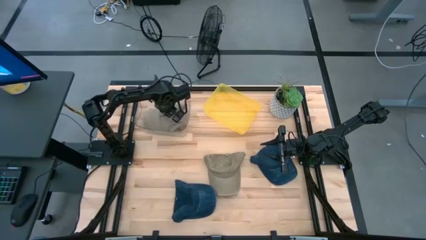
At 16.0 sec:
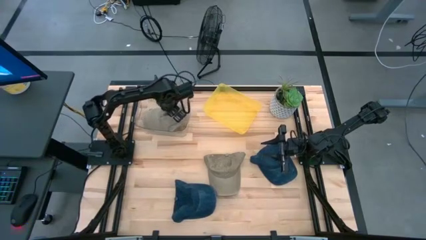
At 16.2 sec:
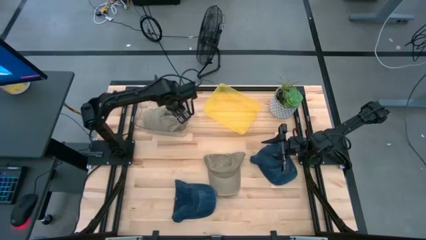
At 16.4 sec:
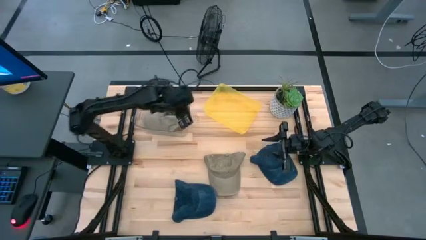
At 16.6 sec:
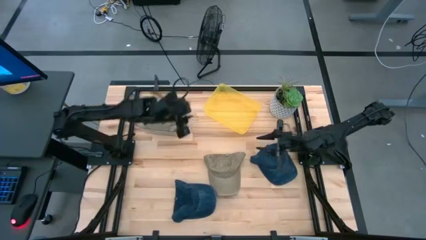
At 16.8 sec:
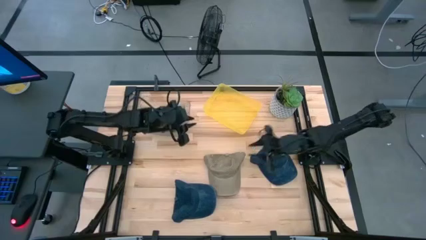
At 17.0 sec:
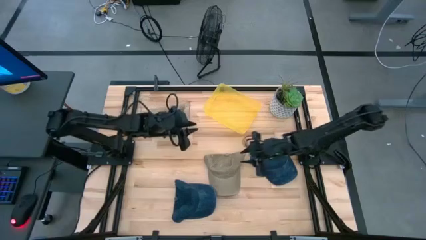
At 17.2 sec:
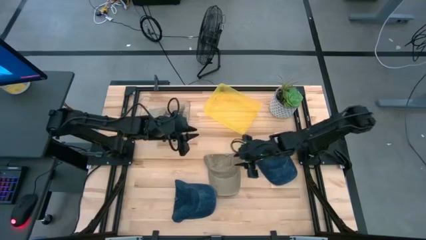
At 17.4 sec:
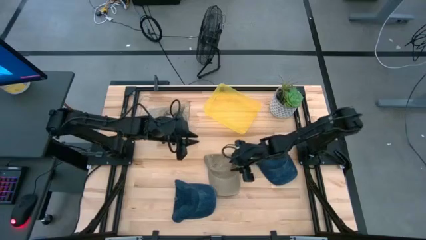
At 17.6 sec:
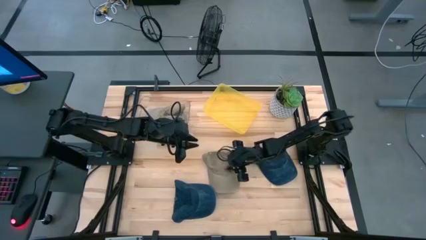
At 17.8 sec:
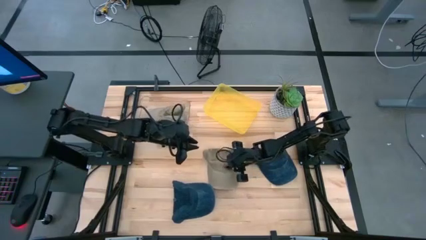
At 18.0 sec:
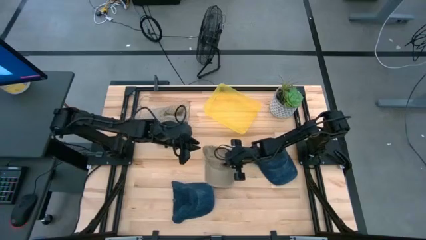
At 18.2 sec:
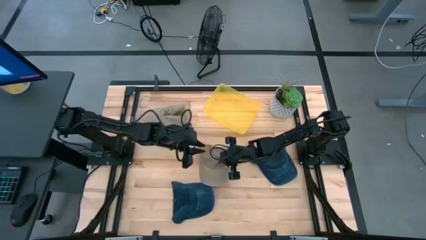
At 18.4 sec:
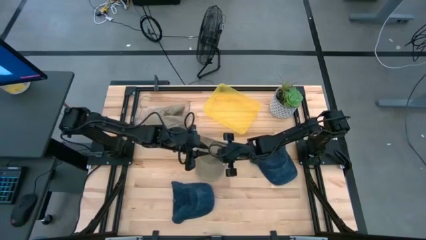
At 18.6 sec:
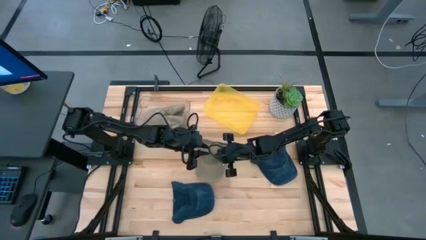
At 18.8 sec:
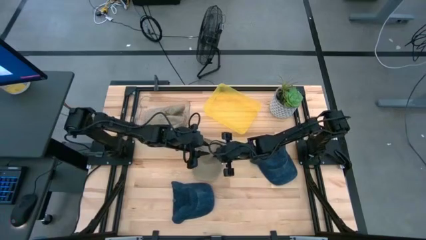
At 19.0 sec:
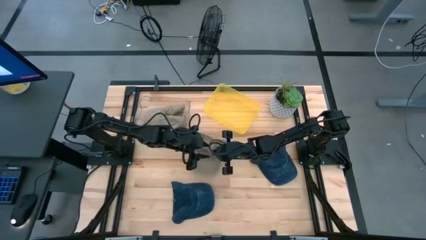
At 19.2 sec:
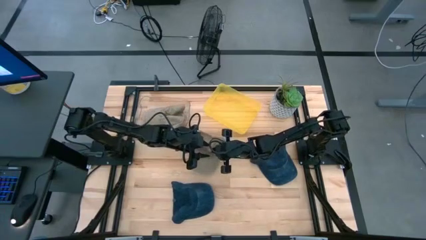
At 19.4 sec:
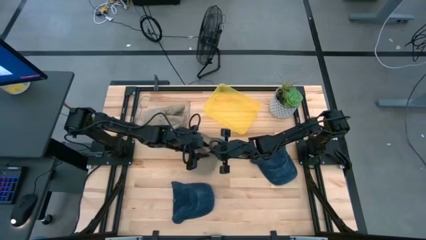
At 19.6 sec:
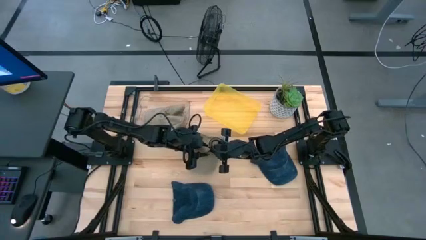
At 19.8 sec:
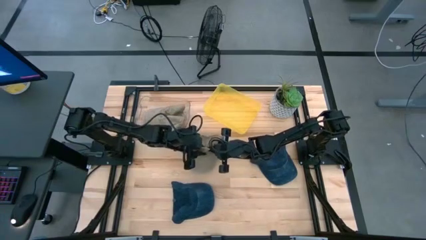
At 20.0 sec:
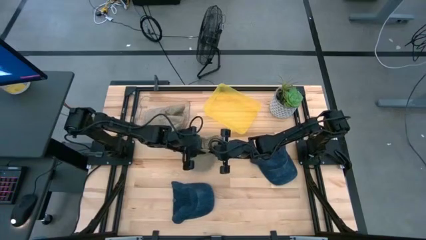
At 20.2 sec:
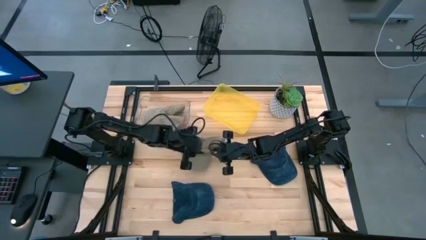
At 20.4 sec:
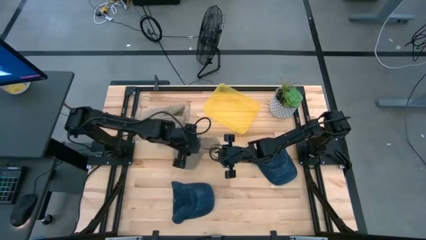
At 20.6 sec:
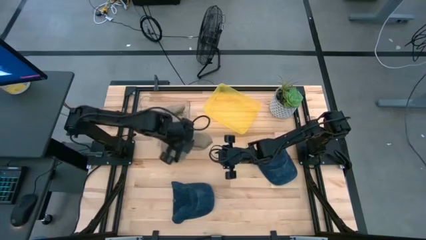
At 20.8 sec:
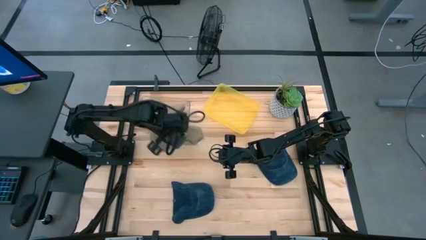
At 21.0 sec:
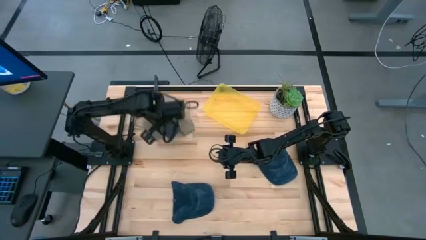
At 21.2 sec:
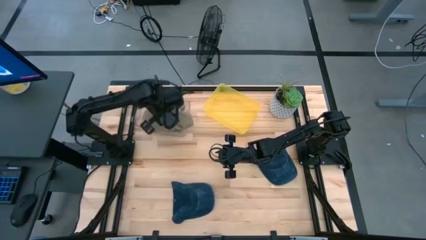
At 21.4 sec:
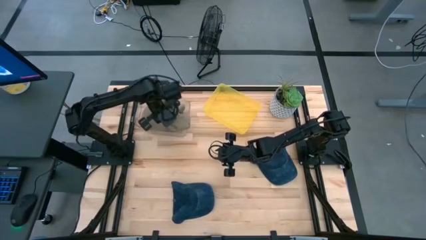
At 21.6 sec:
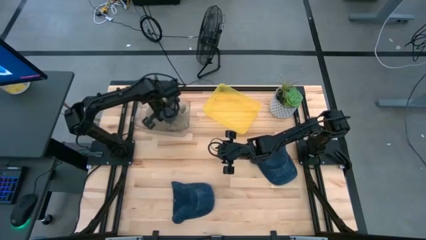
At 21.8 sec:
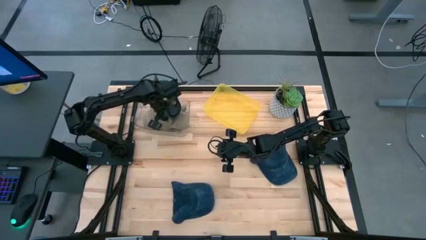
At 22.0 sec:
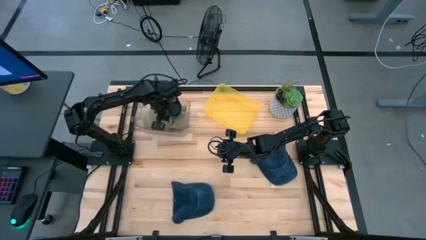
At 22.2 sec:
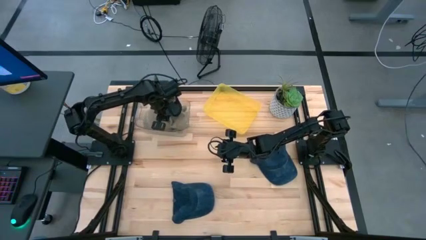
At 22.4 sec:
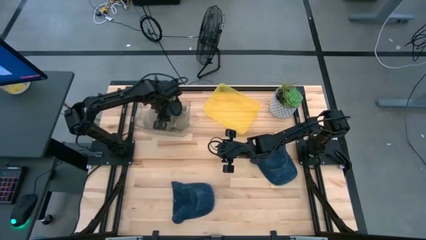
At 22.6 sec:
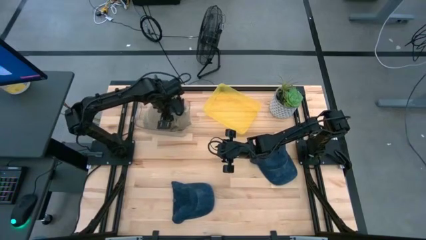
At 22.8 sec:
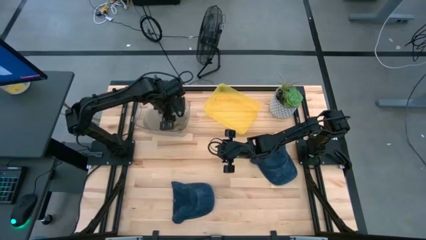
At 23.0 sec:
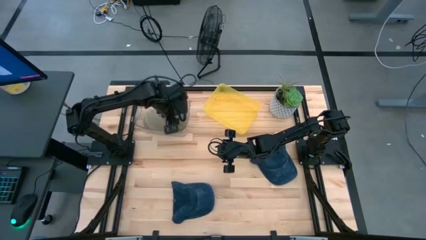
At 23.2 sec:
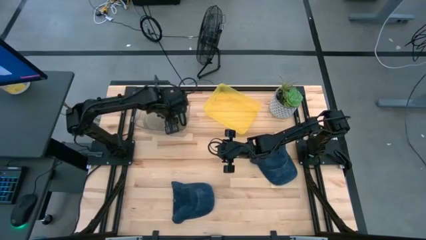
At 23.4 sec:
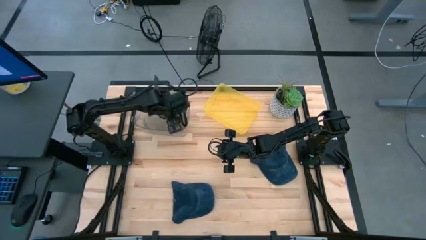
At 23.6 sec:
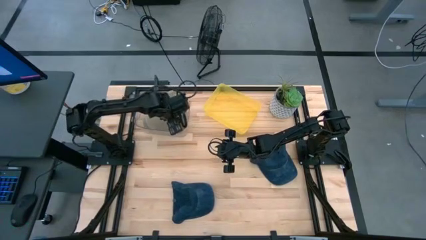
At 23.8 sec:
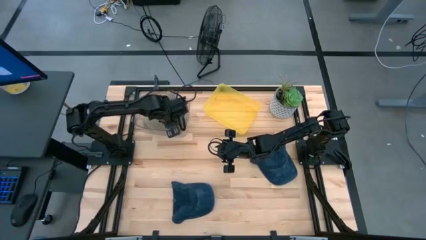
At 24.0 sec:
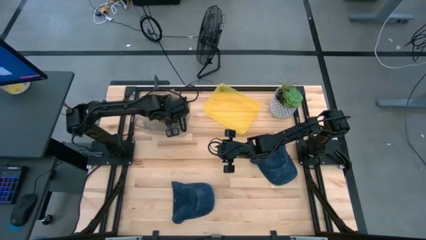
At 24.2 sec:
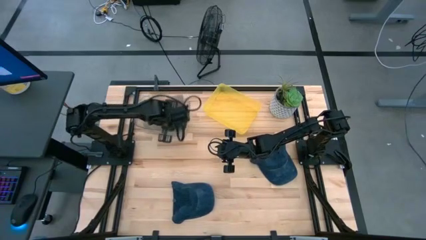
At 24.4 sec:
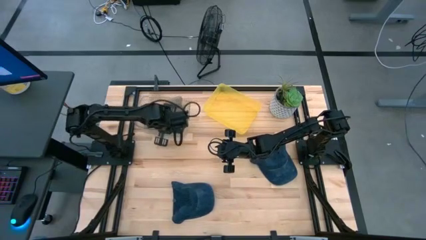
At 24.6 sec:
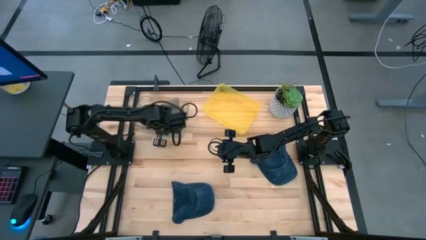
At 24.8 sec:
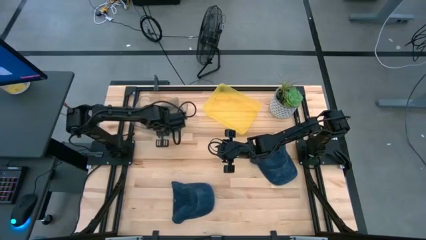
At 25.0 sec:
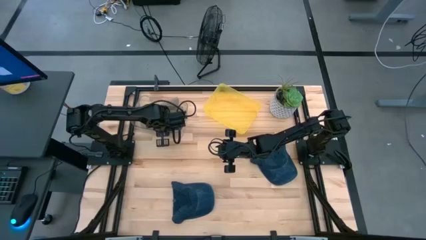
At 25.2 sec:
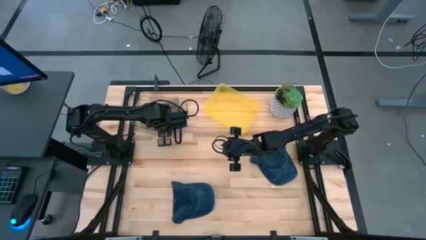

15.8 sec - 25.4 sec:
Task: Pick & Place hat
Put the brown cap into the transparent bin

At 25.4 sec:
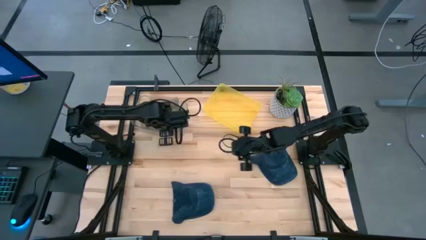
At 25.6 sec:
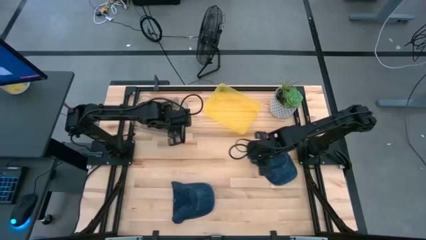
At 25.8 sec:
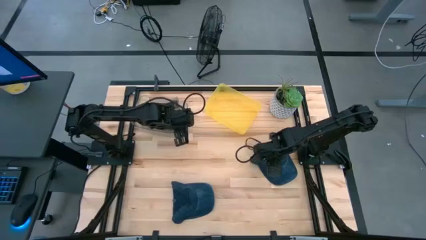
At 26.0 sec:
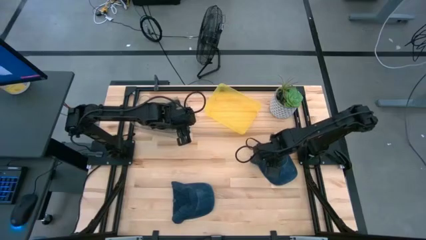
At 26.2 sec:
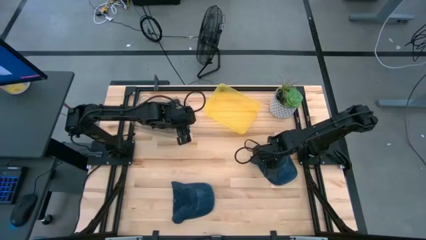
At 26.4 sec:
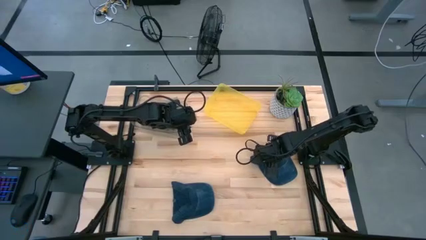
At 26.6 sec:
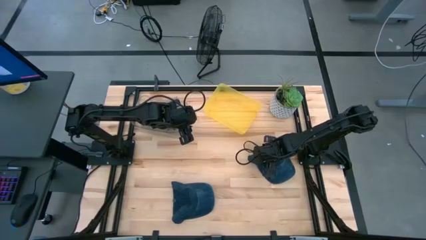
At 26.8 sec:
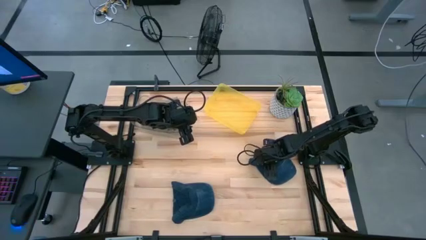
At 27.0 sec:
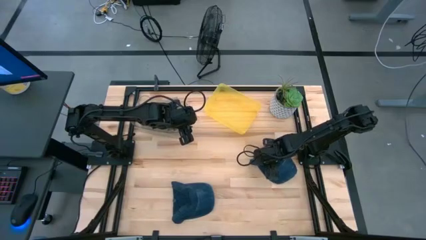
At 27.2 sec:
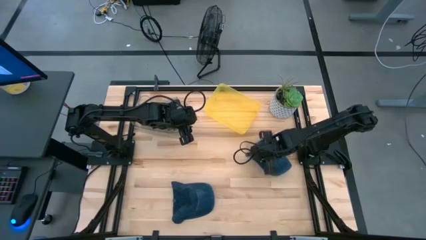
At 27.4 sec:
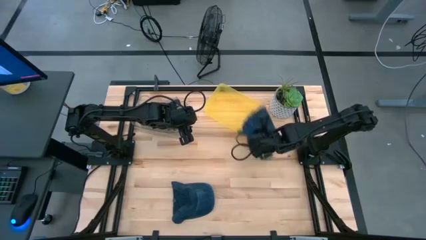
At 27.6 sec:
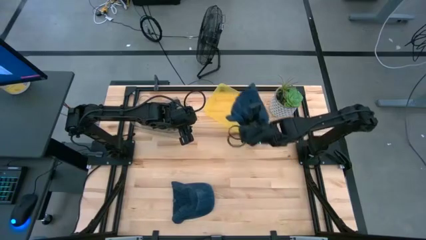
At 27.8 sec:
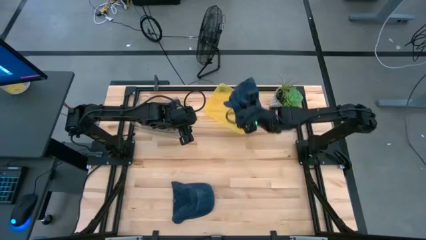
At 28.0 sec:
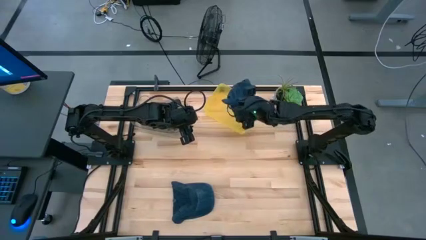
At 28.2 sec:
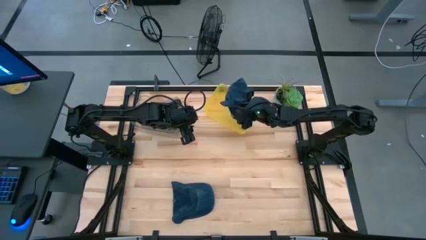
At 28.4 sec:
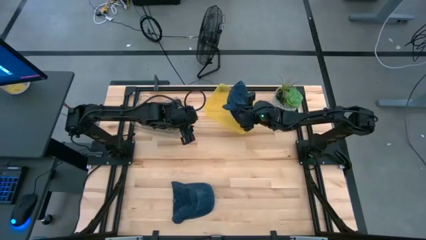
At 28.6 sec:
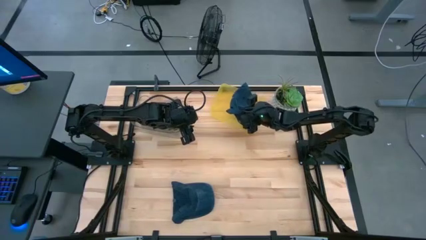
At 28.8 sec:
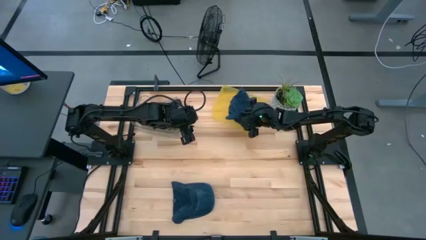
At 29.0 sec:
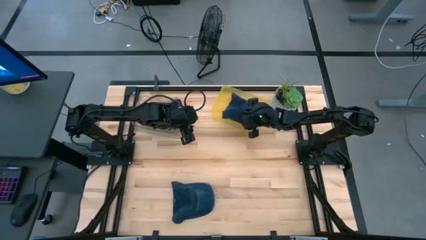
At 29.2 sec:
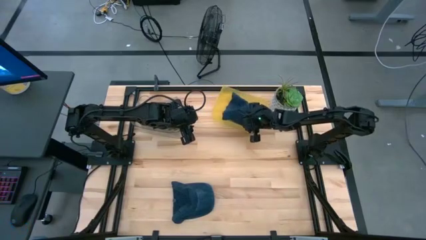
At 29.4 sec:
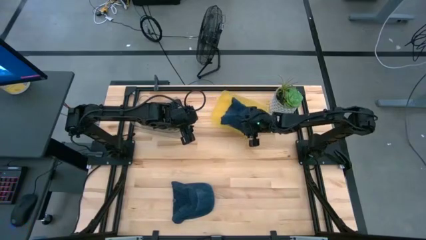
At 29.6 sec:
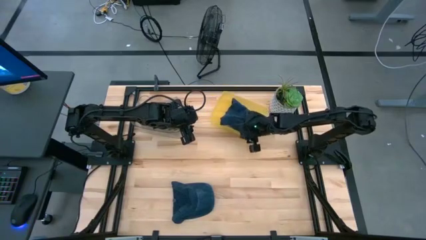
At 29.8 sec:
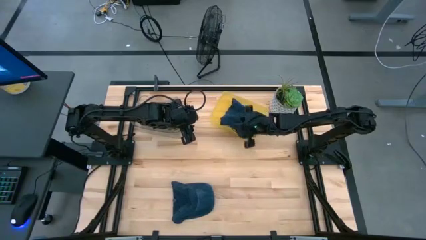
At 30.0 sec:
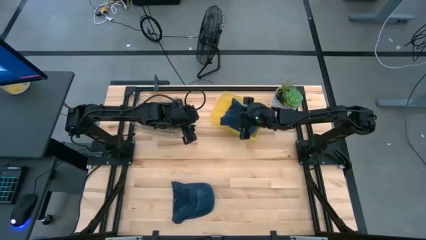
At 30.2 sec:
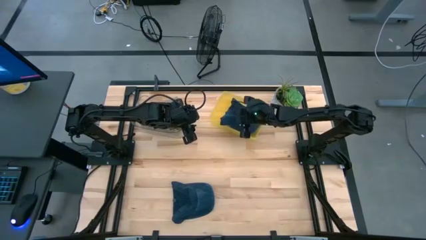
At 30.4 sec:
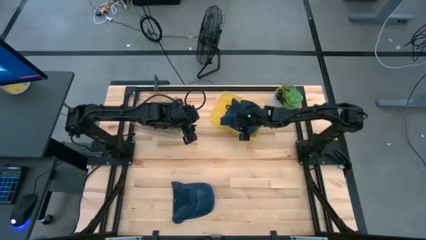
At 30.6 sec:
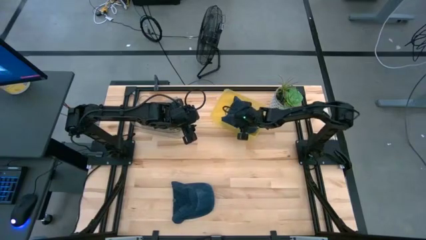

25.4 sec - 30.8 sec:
Put the top blue cap into the yellow bin
